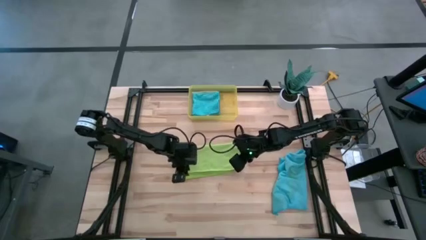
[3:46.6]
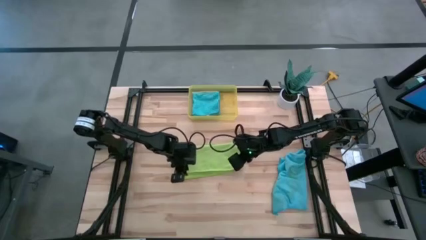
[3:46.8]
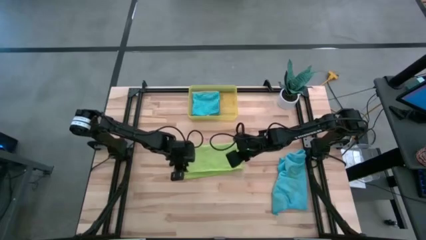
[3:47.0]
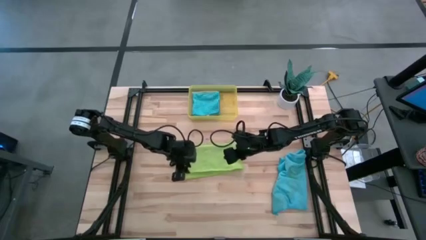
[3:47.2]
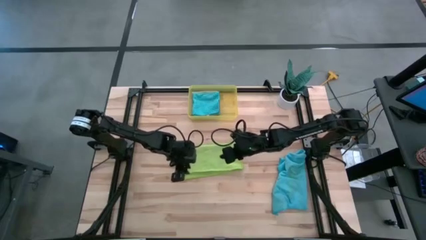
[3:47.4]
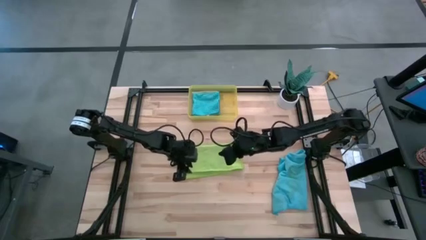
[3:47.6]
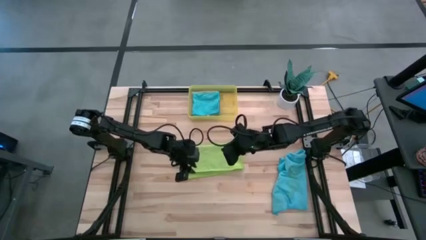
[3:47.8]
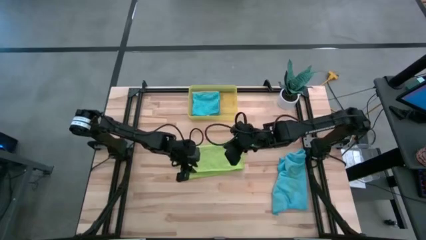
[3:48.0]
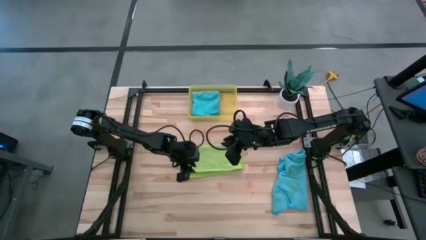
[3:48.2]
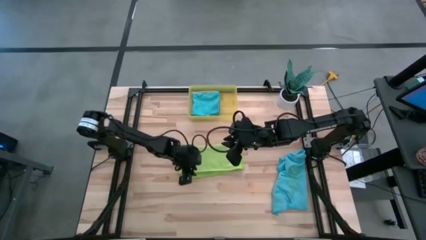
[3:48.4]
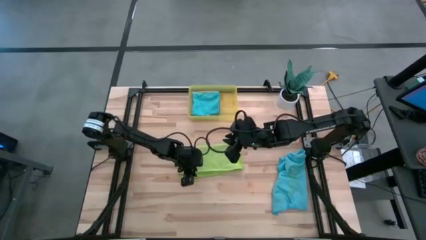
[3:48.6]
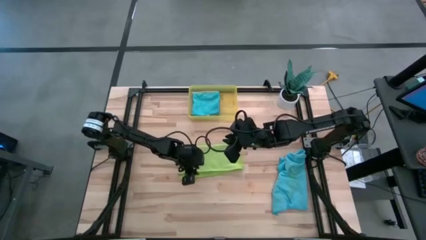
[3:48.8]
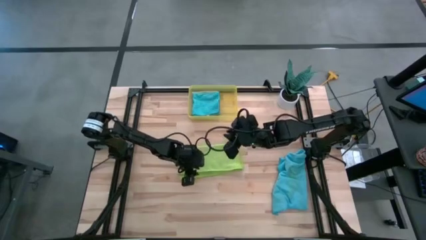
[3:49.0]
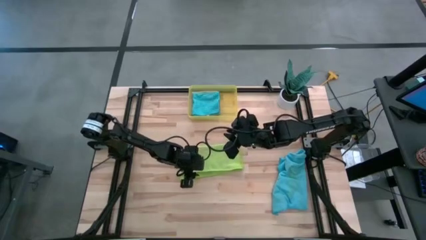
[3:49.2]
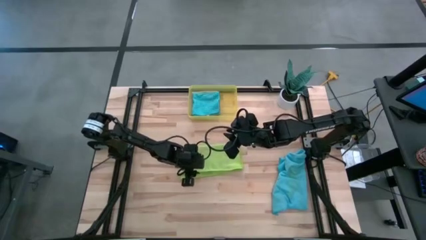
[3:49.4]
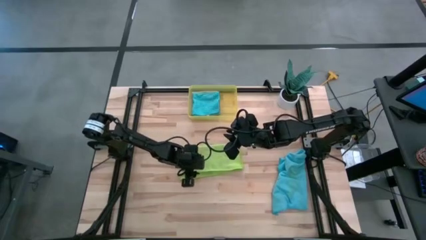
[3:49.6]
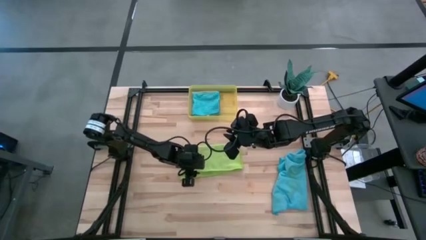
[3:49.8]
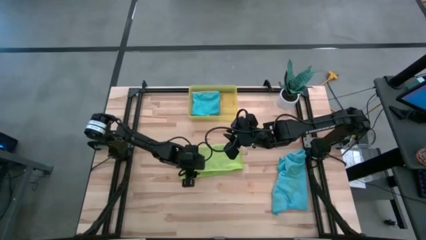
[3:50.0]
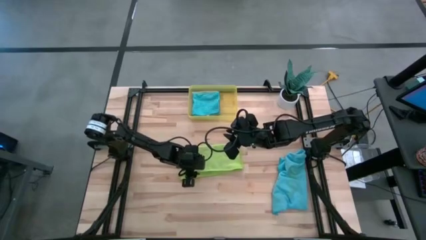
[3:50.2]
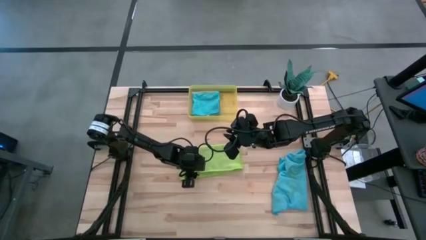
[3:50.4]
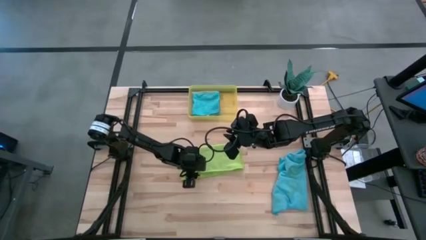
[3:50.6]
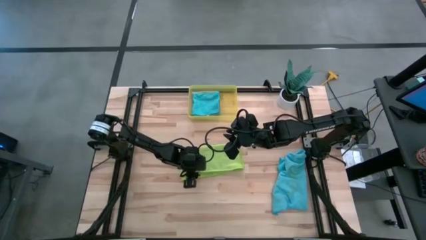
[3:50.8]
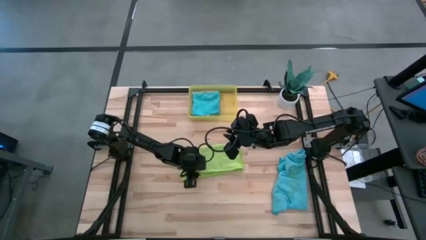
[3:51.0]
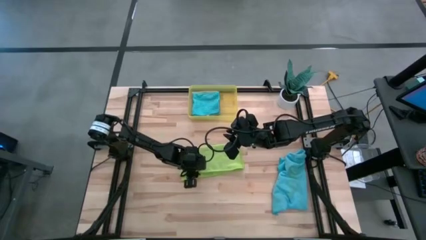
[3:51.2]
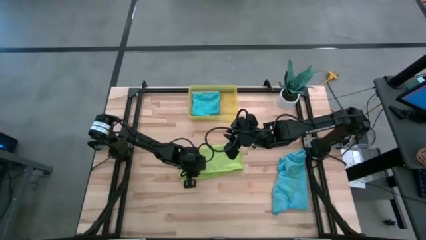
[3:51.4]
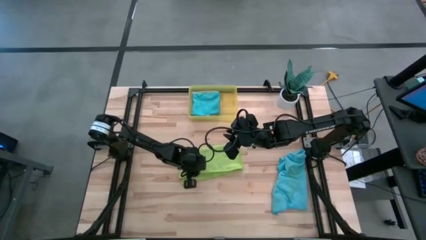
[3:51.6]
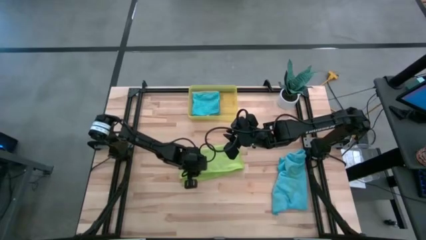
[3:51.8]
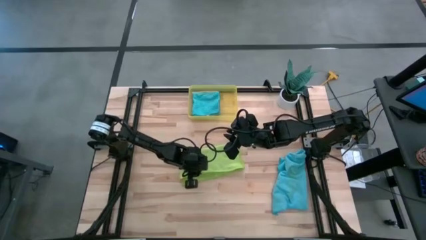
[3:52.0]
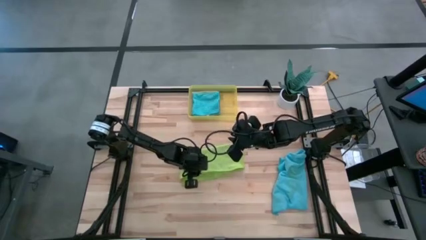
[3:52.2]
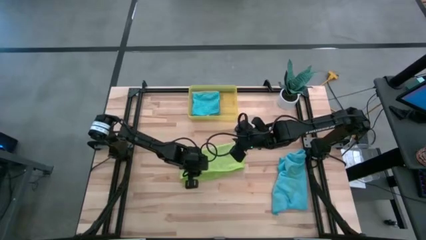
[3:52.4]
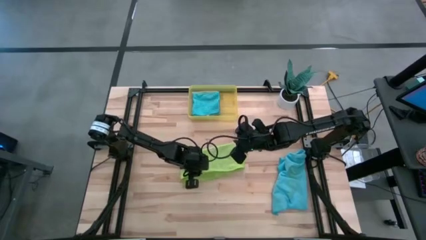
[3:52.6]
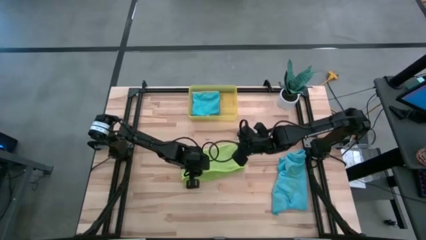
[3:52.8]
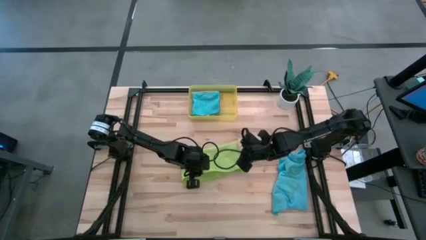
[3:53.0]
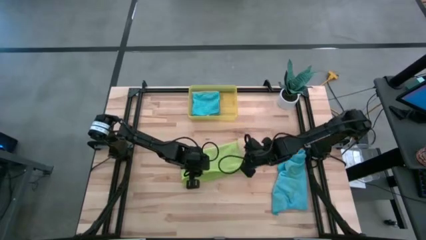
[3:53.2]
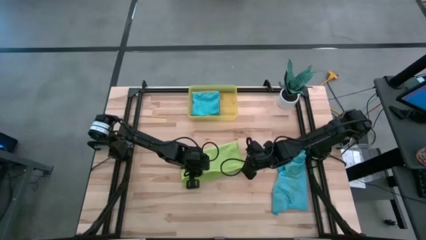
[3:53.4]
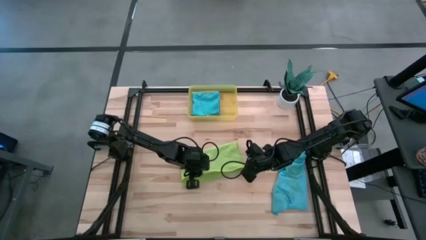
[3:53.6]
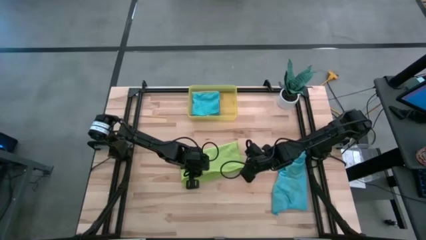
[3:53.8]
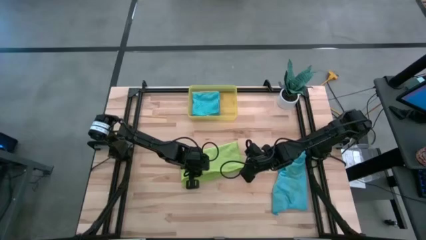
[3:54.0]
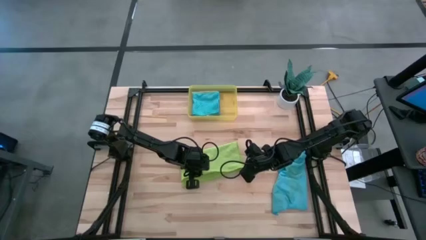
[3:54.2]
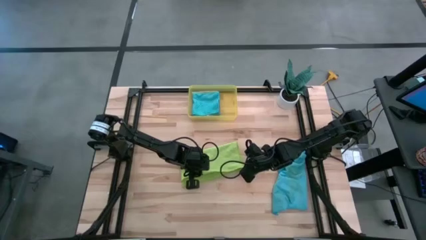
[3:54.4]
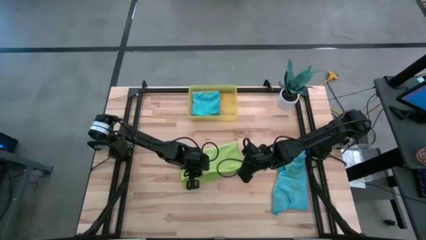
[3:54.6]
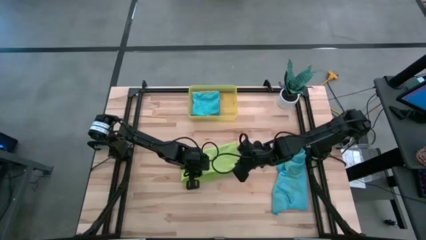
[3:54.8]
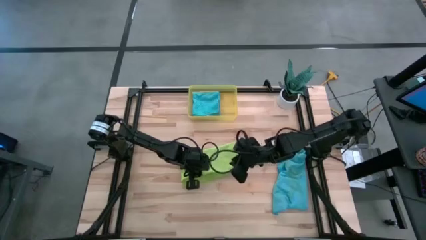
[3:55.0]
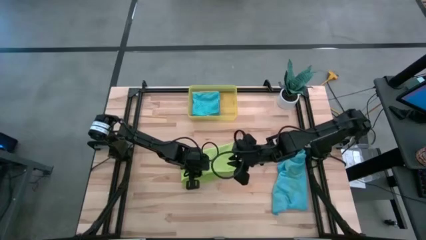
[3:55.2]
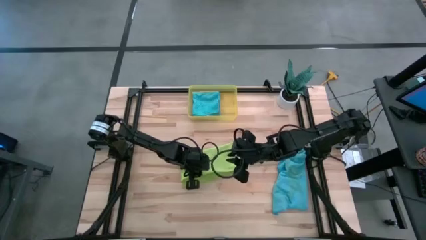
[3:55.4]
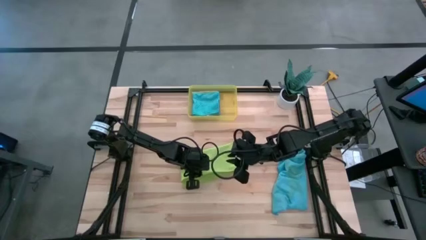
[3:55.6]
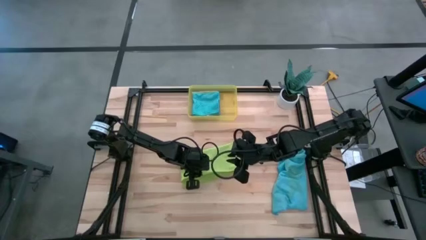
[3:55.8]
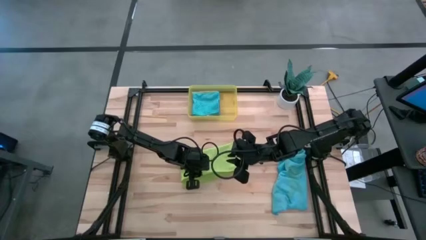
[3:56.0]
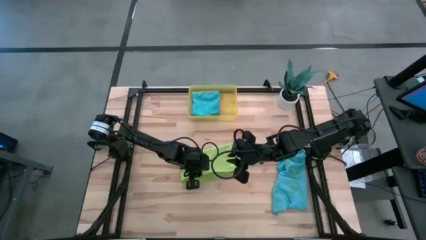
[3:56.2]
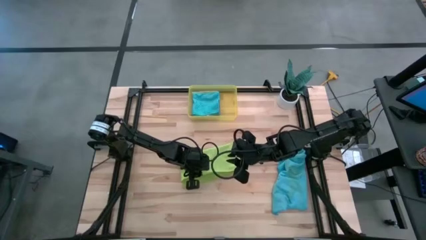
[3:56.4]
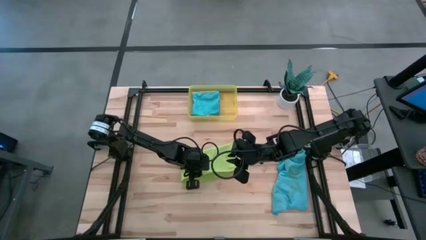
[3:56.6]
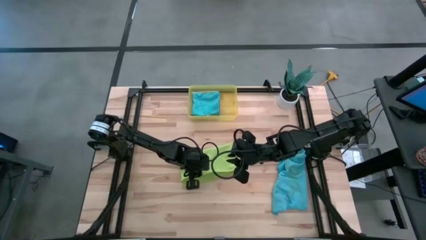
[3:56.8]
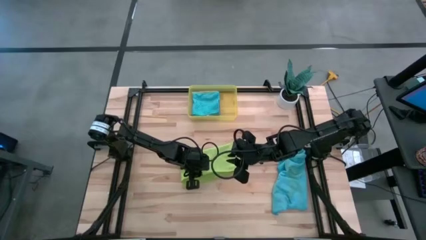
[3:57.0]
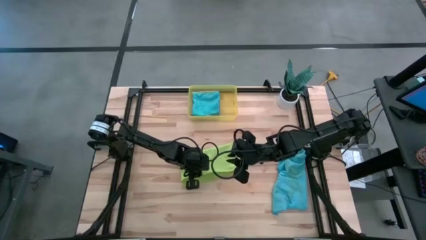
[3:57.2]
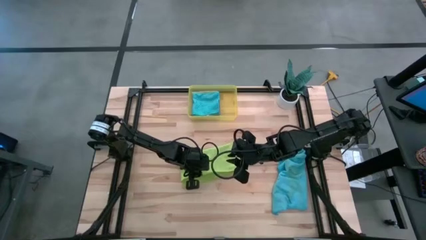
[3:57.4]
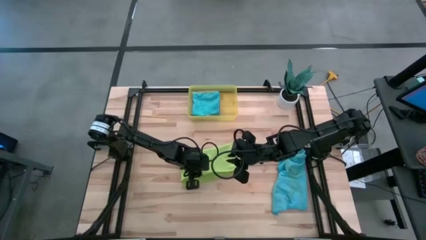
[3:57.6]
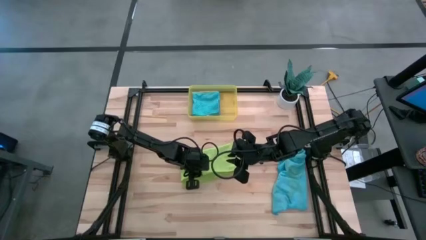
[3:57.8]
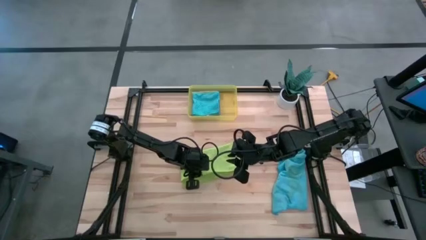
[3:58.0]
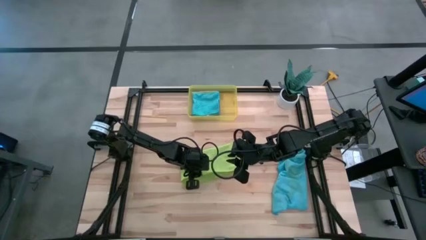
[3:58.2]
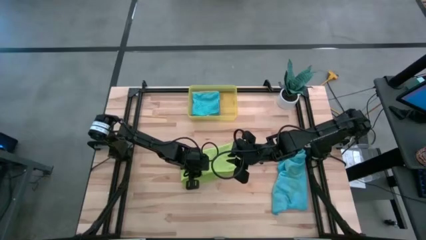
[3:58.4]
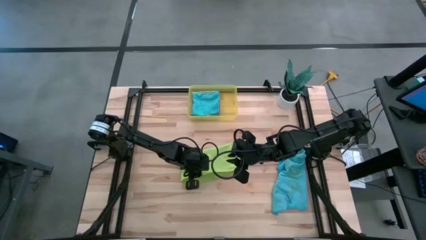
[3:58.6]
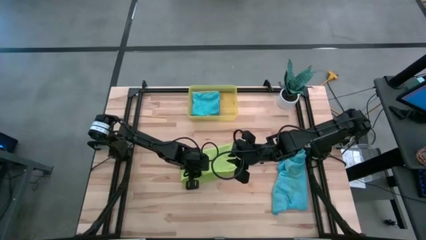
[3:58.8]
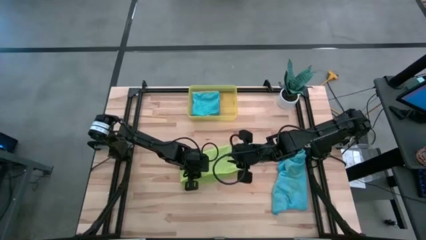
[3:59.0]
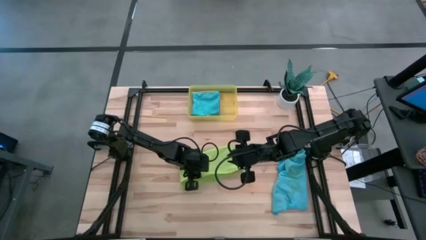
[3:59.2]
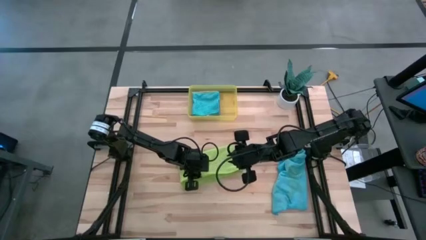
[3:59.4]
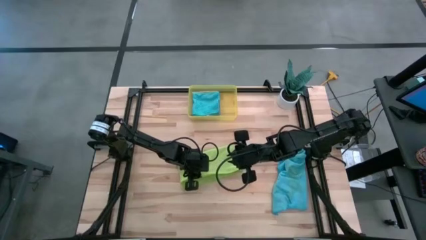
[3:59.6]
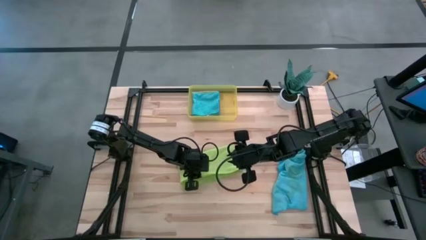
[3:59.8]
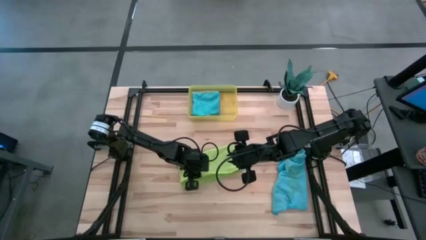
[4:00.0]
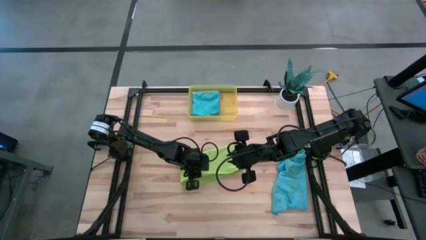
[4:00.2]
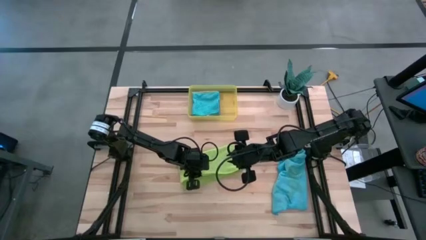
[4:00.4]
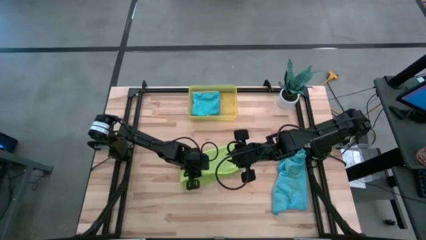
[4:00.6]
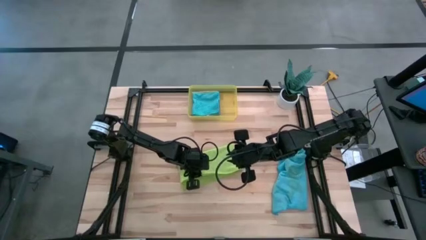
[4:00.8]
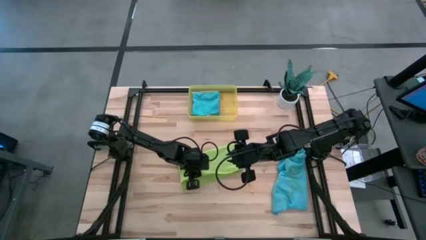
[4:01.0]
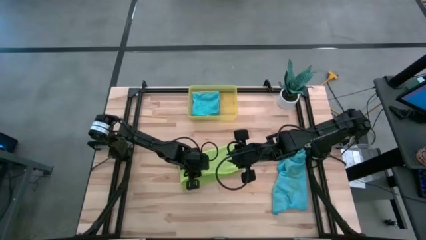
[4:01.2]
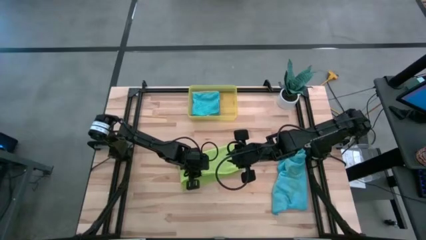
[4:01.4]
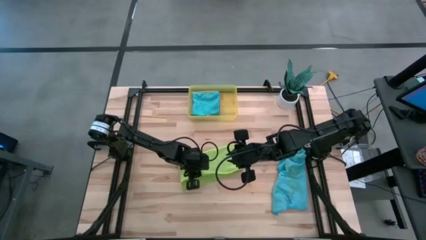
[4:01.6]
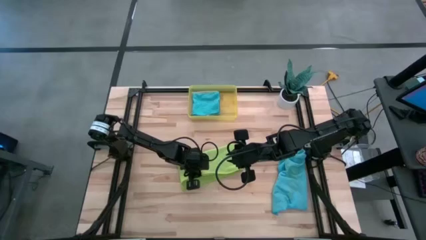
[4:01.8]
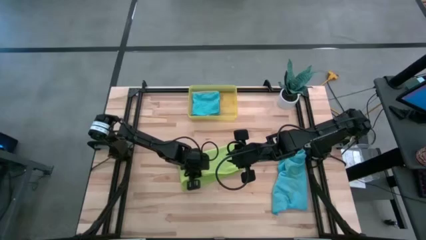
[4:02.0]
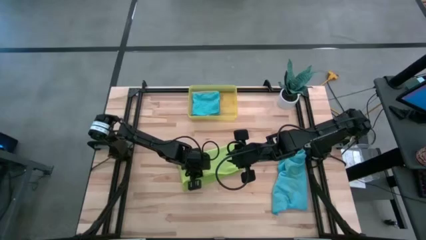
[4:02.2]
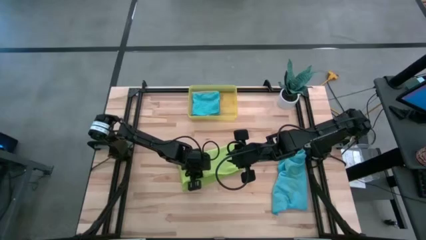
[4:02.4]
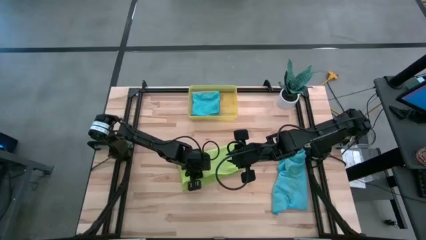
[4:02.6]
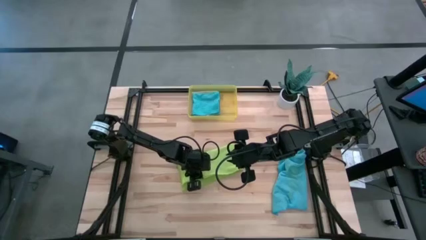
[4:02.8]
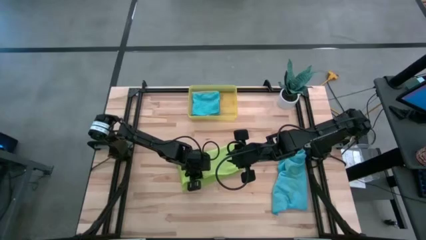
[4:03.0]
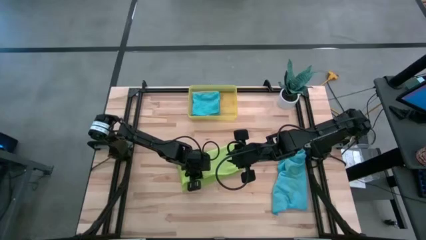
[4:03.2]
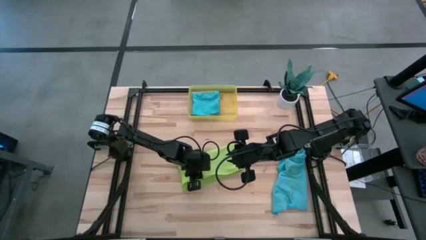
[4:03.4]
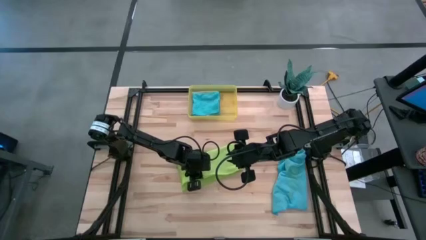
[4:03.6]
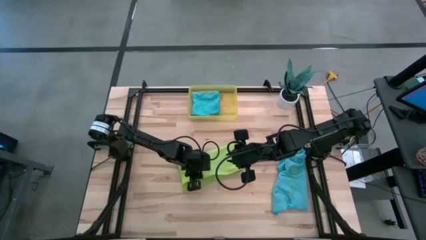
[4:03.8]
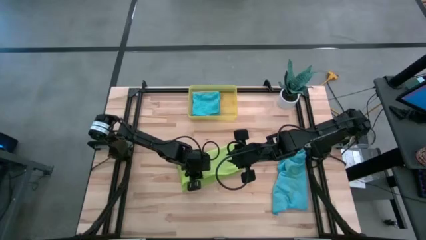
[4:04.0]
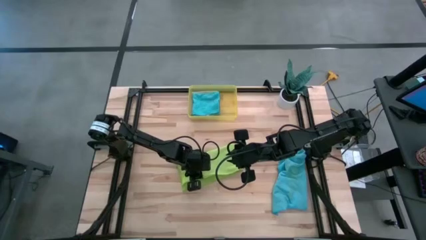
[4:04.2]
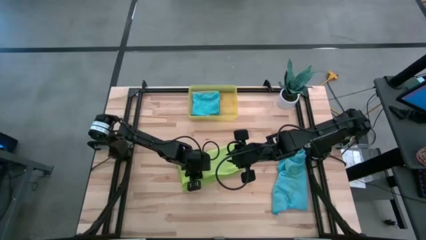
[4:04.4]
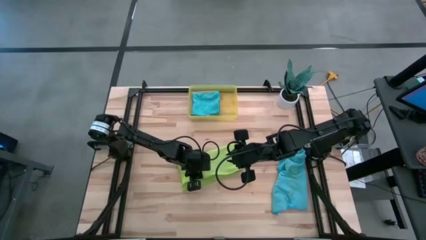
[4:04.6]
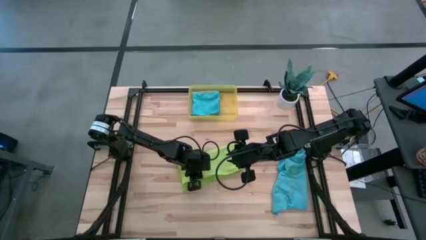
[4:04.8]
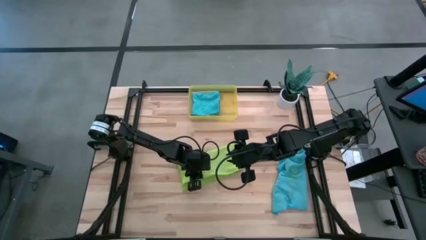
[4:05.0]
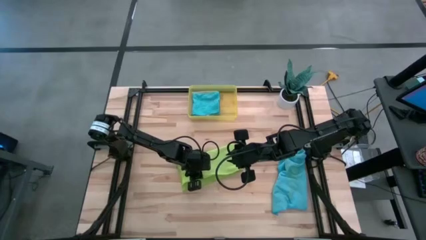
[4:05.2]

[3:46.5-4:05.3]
Task: Fold microfiber towels
Fold the green microfiber cloth
